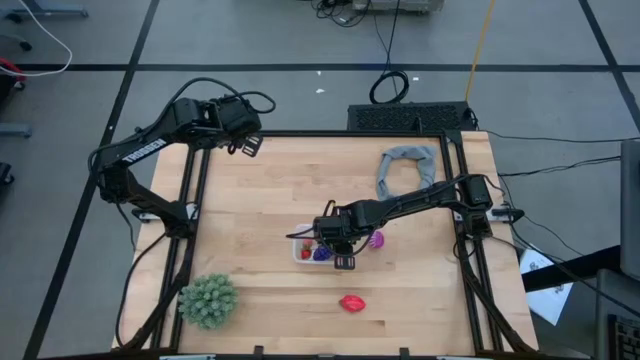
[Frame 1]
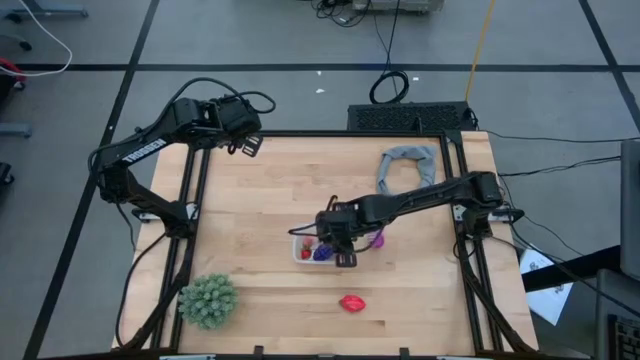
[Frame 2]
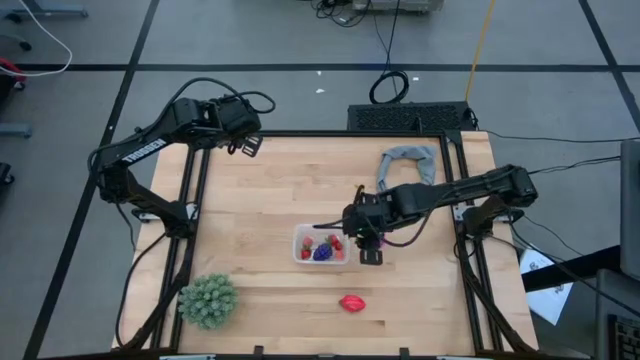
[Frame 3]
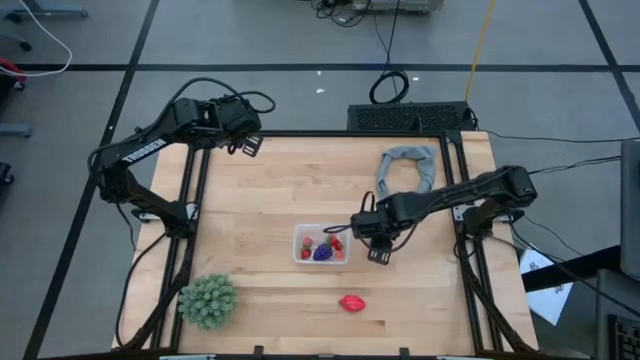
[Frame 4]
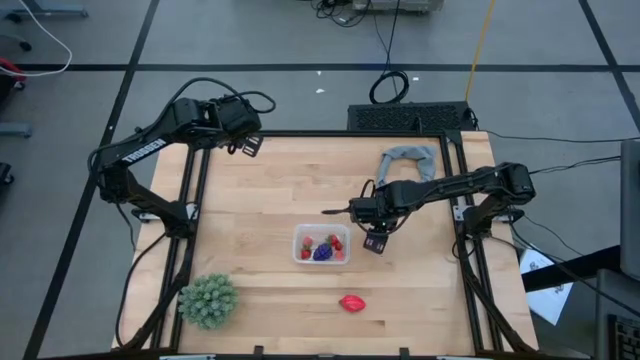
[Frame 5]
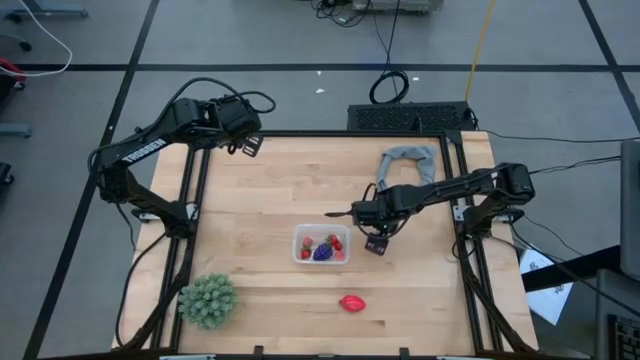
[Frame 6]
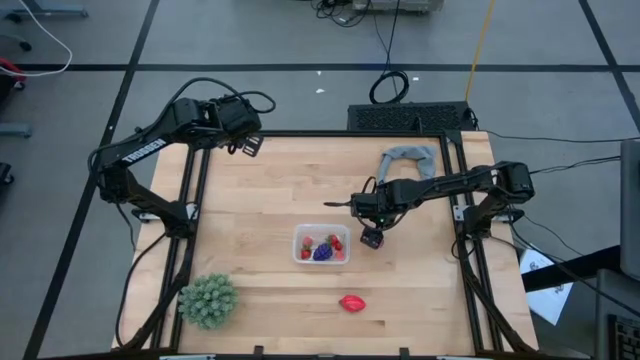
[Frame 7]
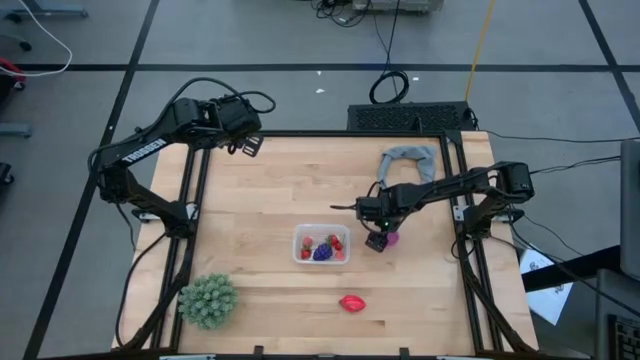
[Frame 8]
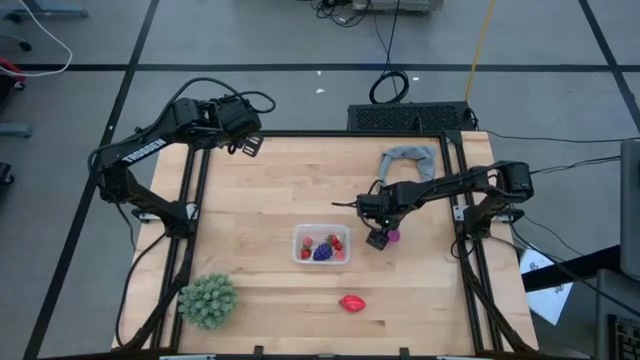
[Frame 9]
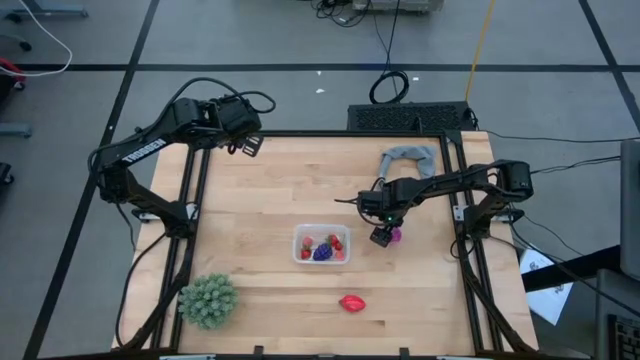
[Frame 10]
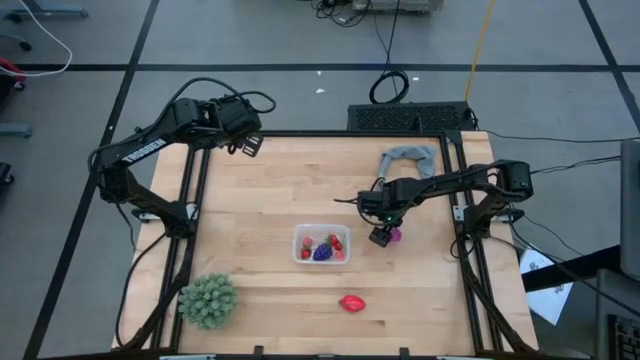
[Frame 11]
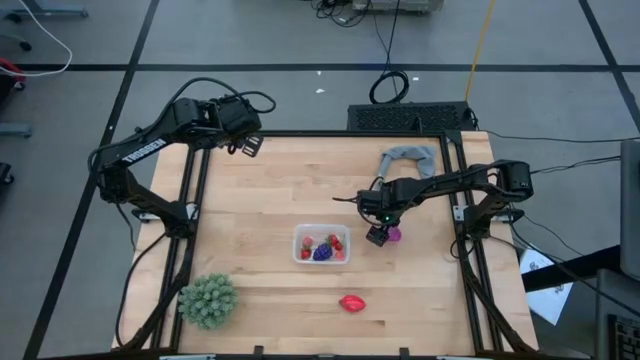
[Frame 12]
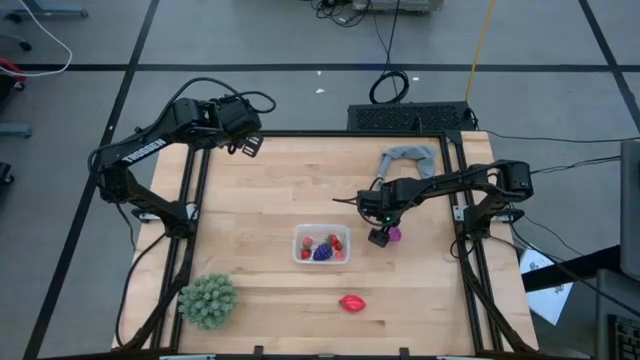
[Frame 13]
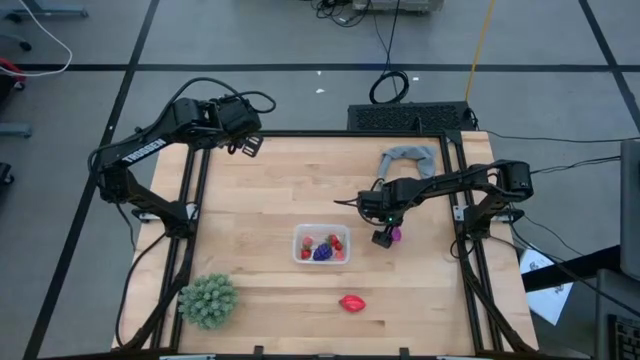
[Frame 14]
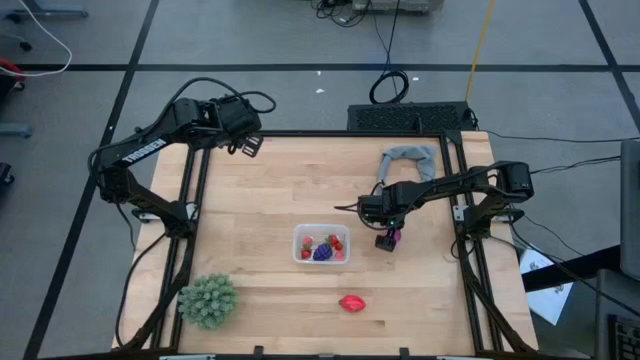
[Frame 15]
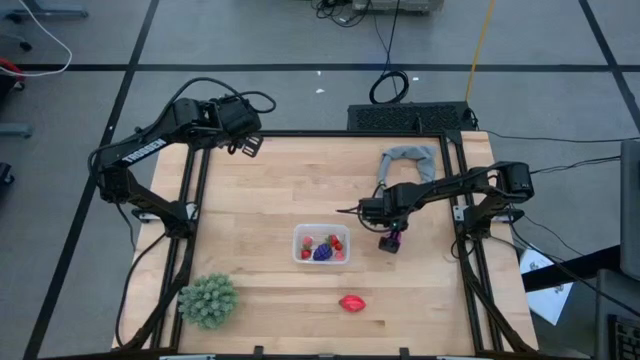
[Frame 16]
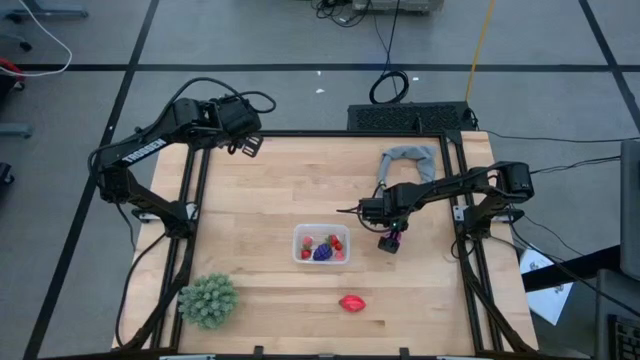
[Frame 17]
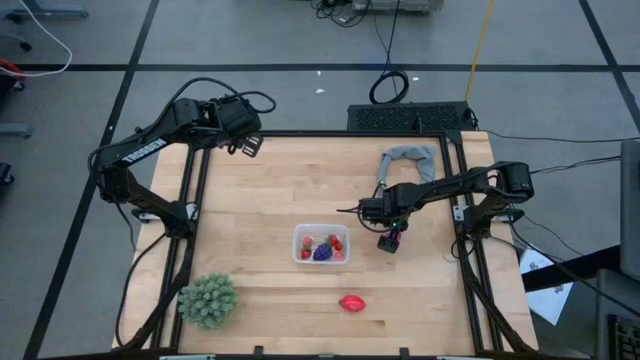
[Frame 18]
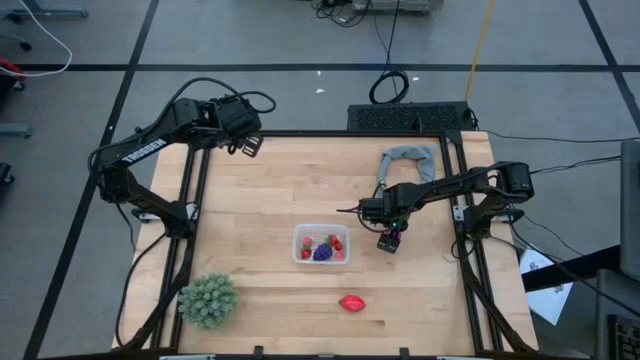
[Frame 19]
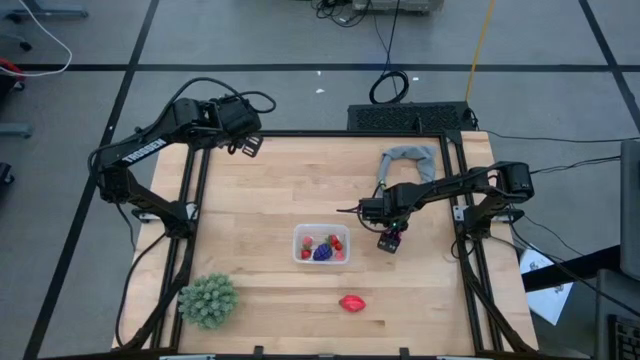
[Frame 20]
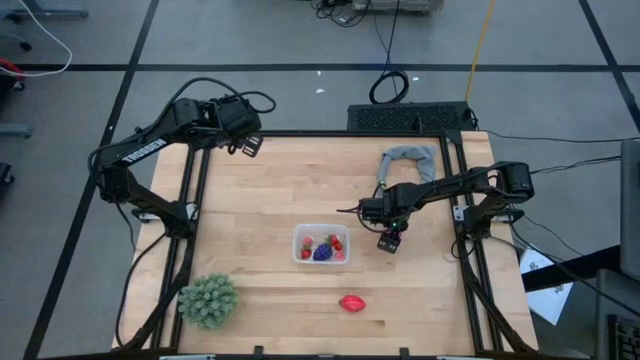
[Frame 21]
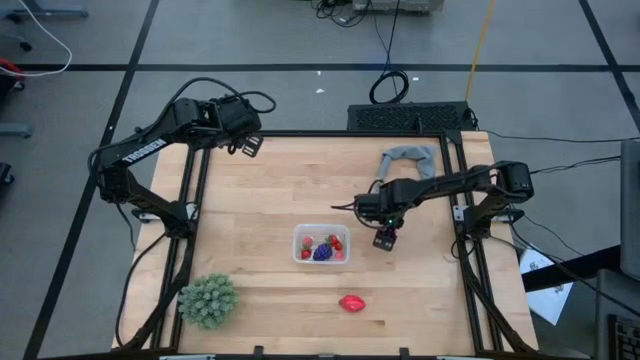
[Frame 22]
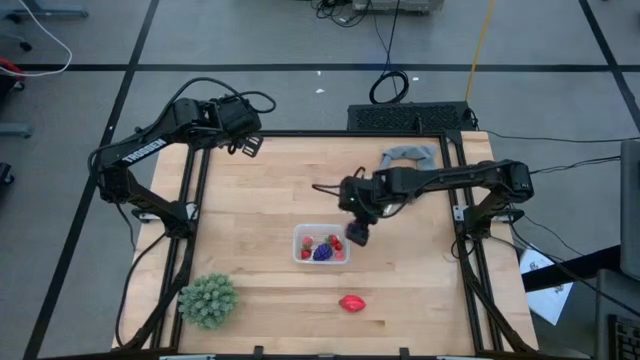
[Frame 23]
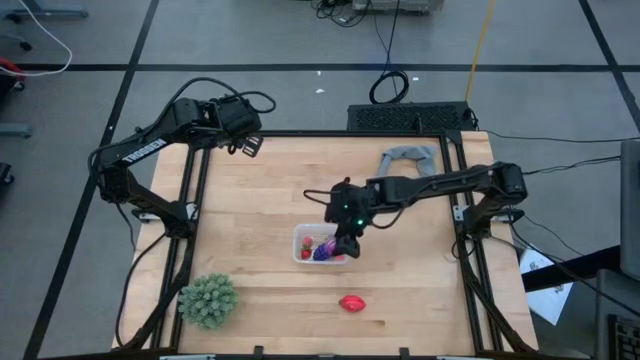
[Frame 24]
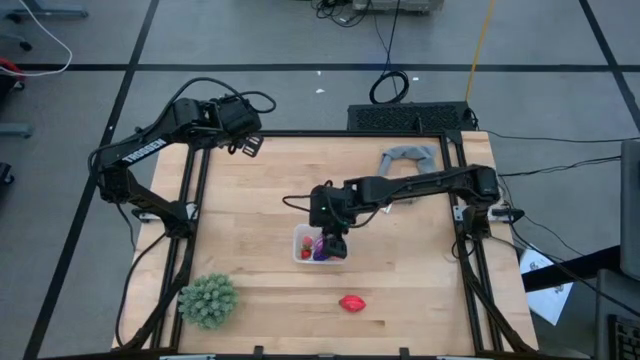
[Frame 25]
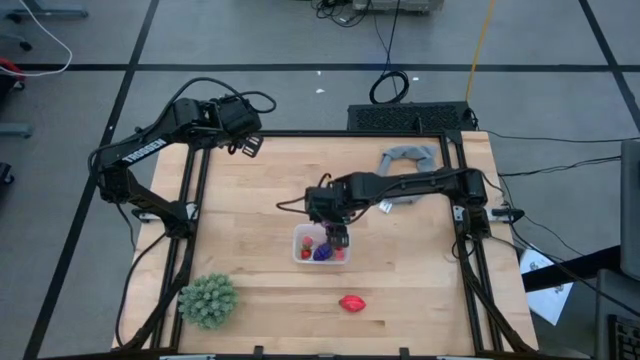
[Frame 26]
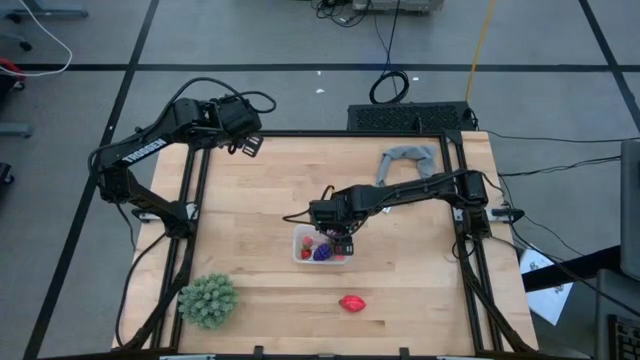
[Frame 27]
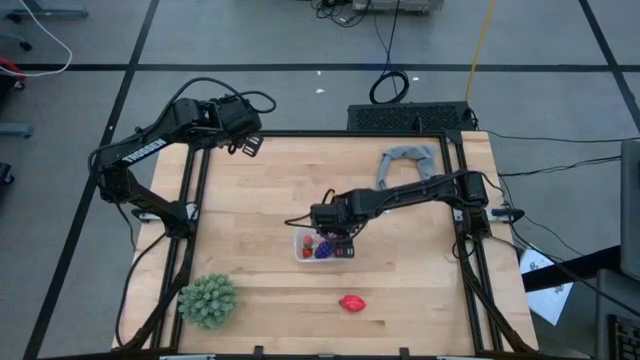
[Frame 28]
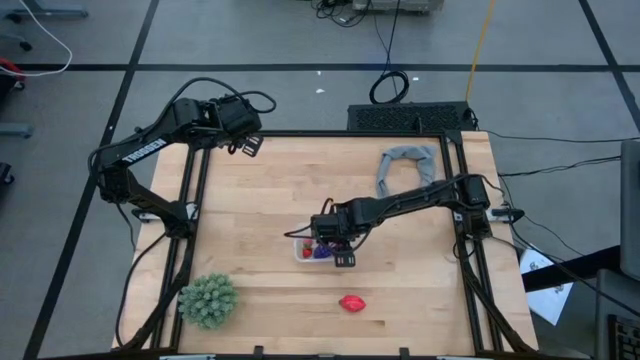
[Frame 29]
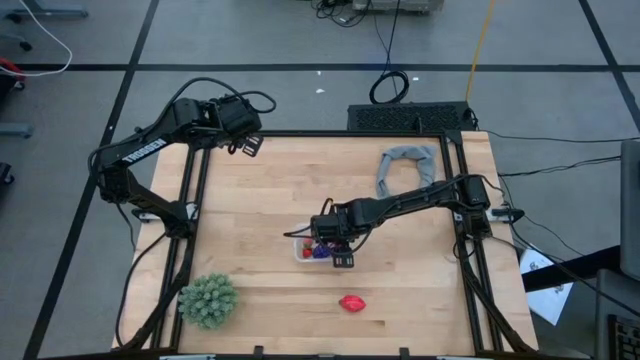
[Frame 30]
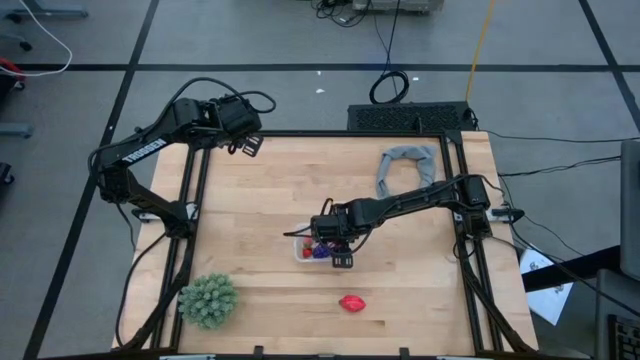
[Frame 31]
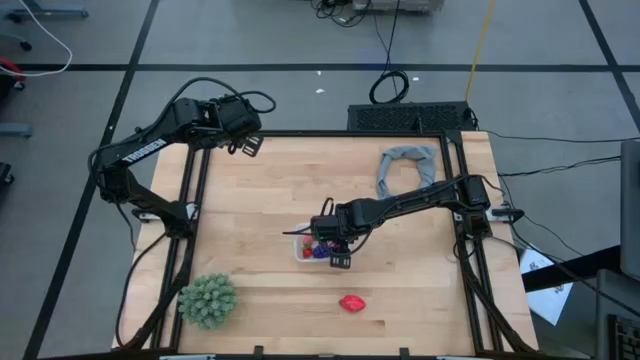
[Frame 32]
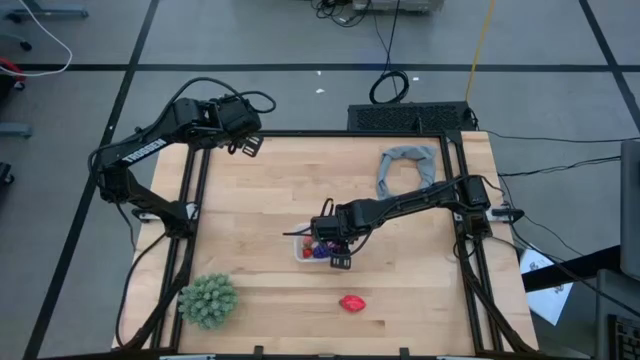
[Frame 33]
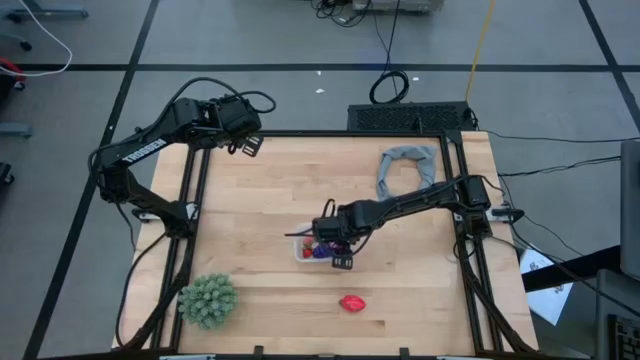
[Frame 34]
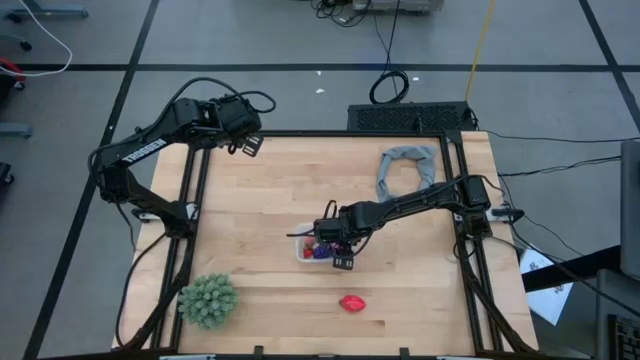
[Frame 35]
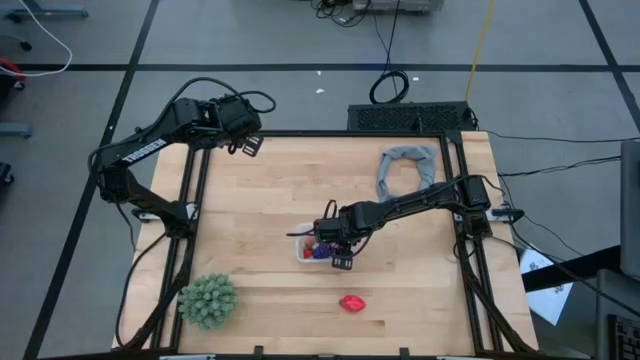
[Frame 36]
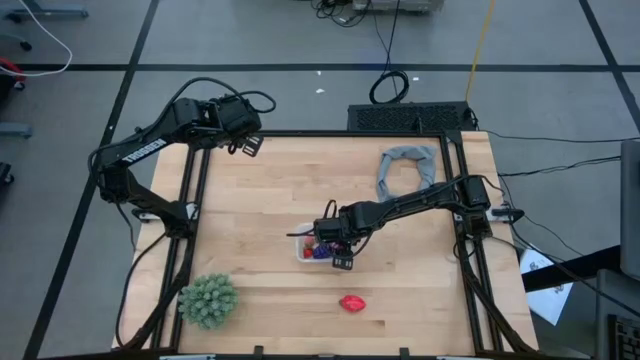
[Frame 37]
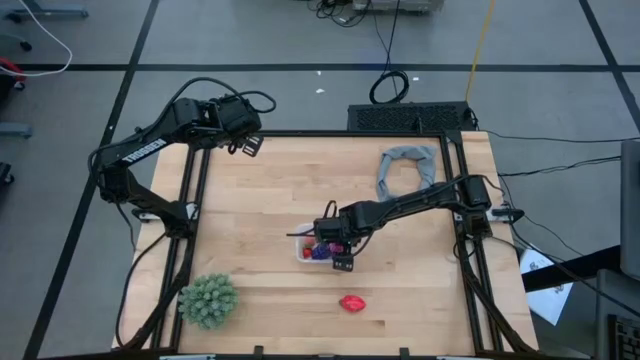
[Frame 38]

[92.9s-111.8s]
Task: Pick and placing Produce into tupperware
Put the onion into the bin
